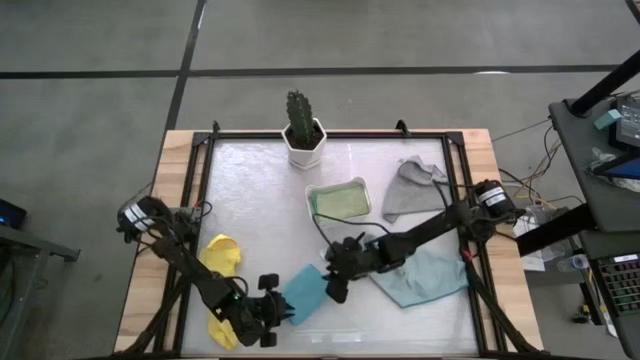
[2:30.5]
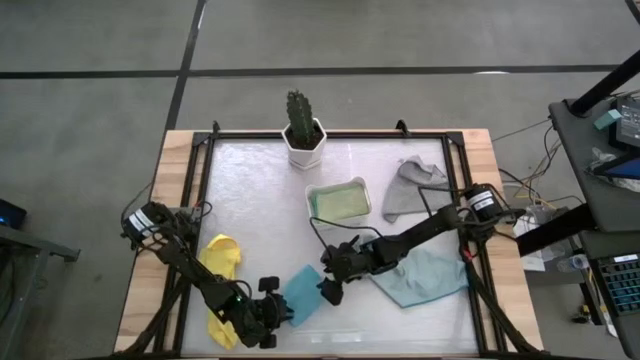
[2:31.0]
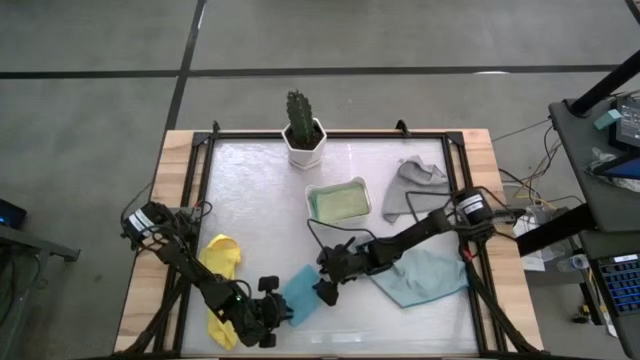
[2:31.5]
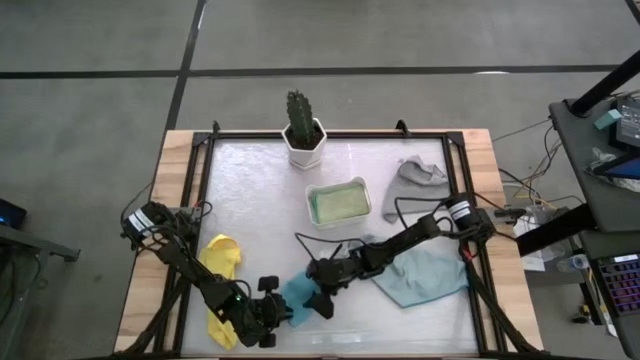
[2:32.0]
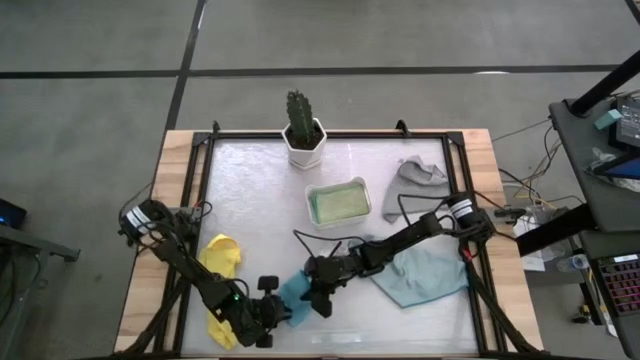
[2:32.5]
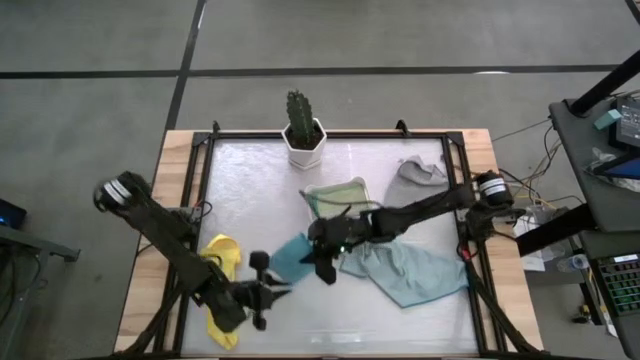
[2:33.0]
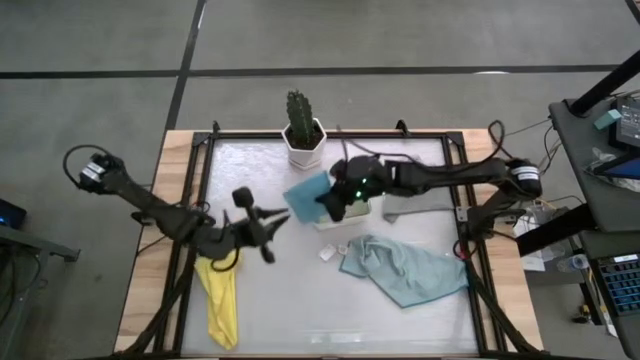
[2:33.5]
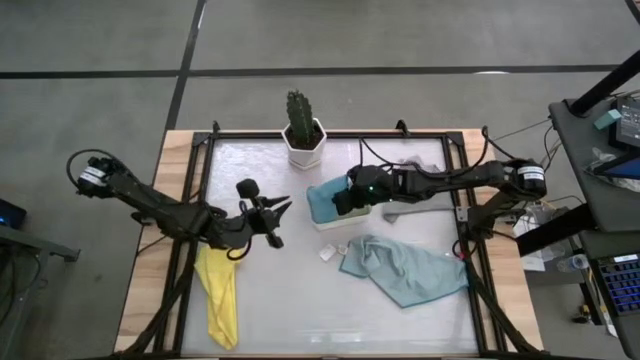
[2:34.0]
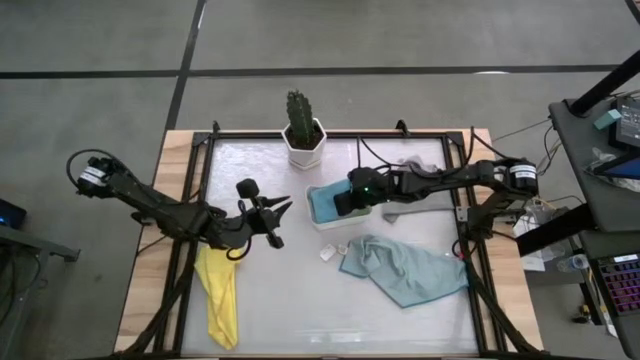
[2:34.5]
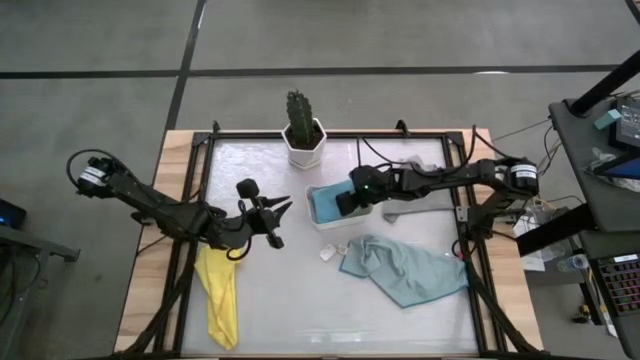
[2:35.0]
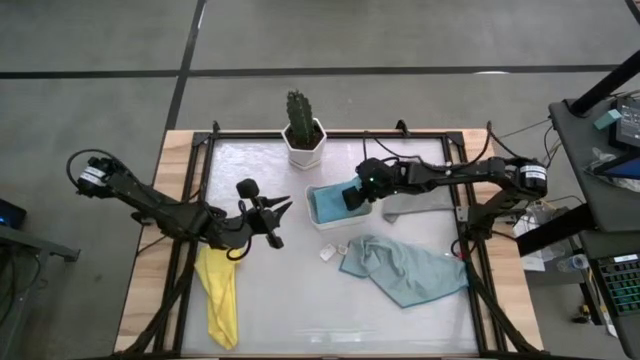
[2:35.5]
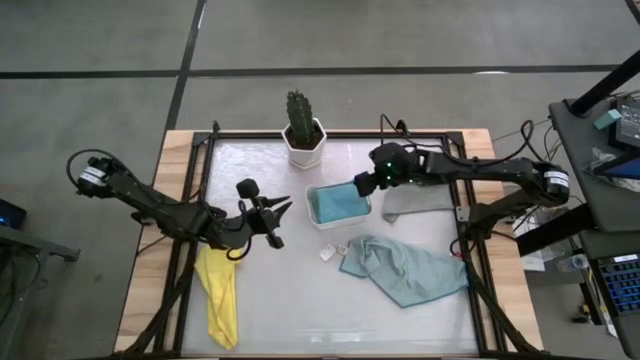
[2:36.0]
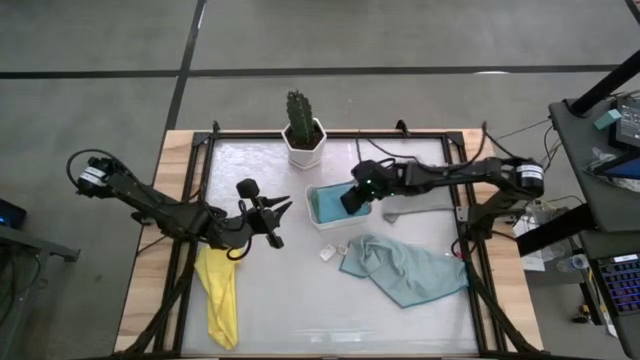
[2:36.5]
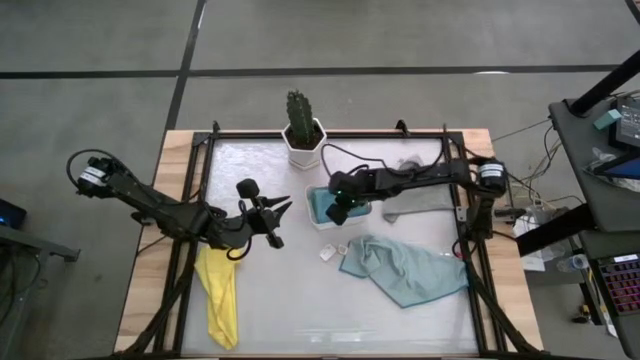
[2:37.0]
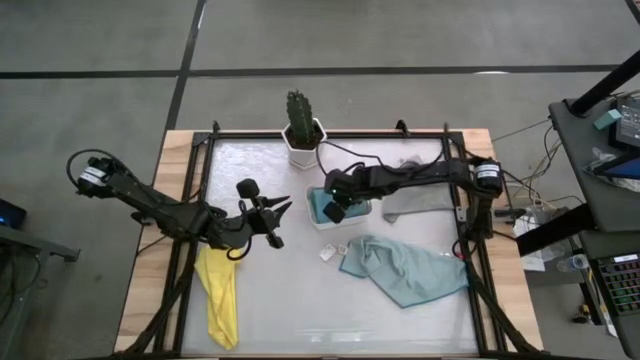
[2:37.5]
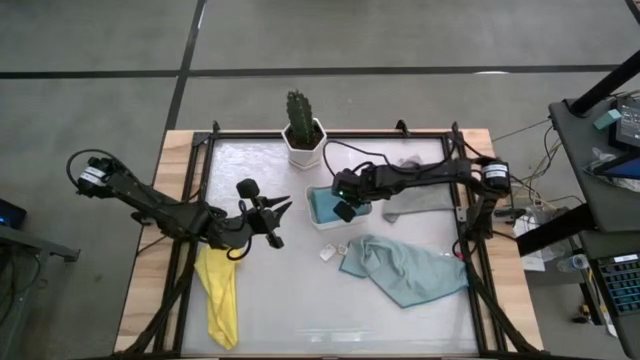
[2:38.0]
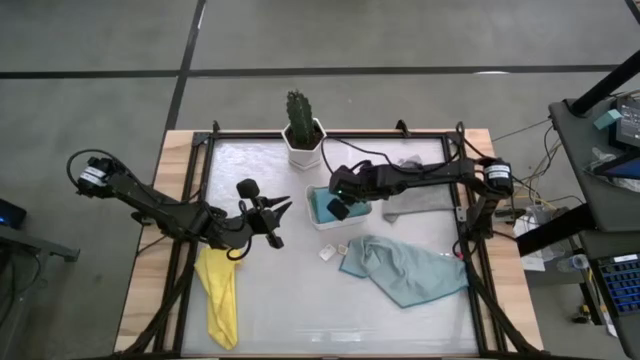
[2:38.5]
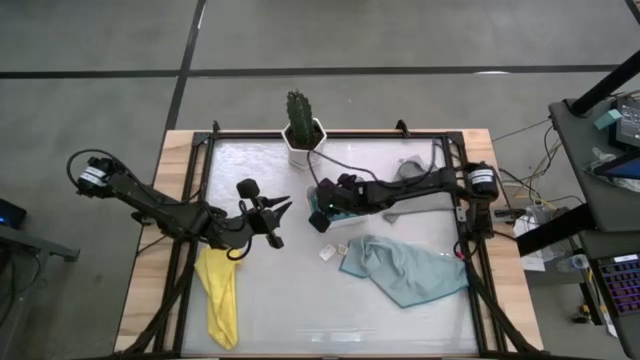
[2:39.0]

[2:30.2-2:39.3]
Task: Fold microfiber towels
Put the blue towel into the bin

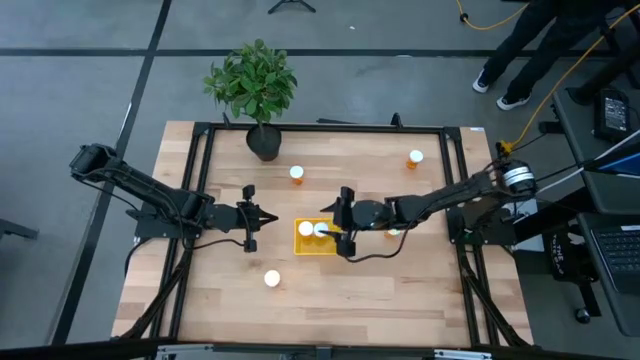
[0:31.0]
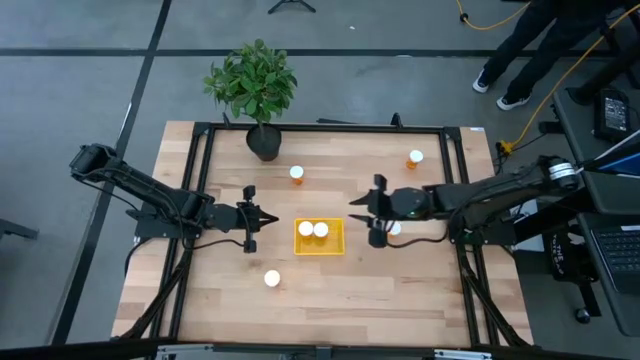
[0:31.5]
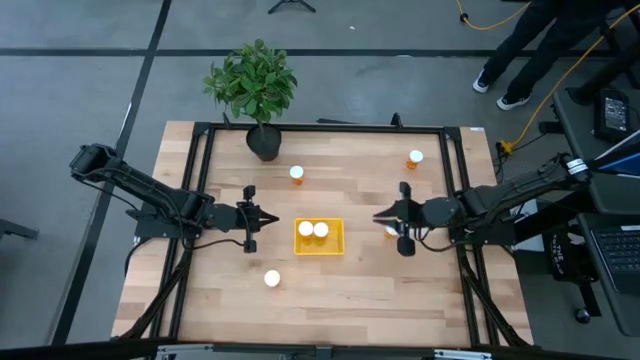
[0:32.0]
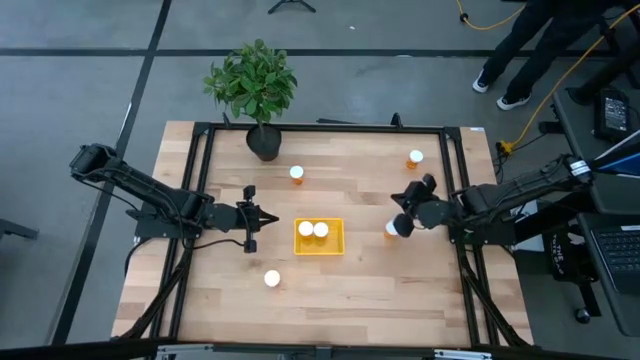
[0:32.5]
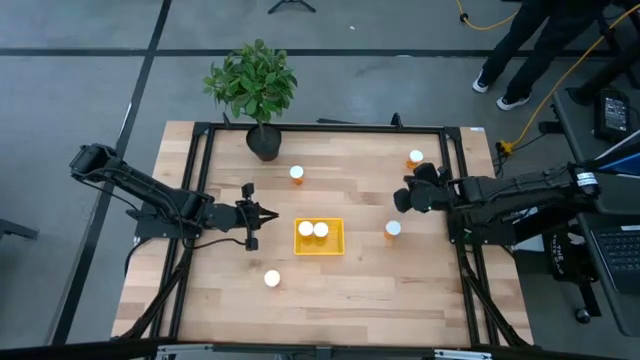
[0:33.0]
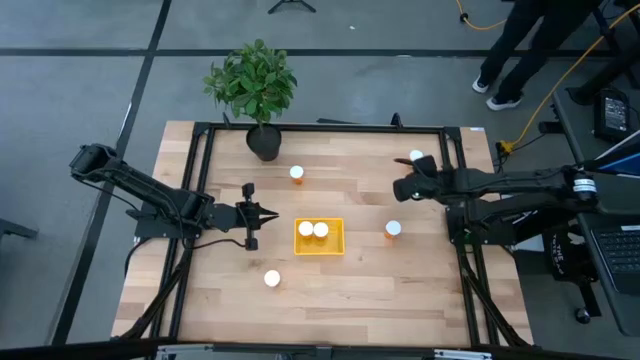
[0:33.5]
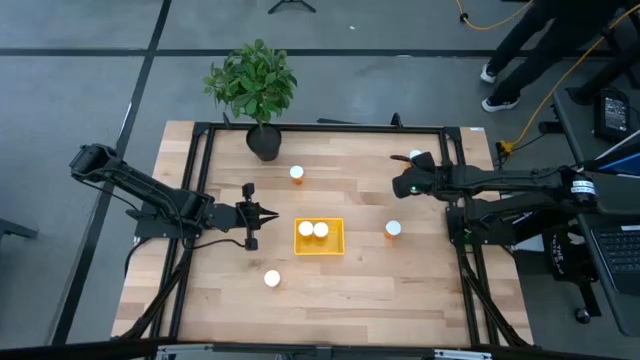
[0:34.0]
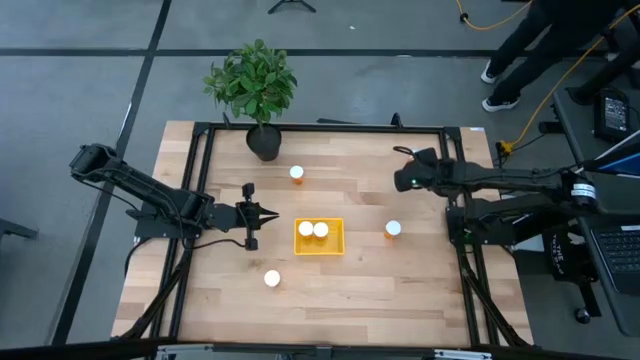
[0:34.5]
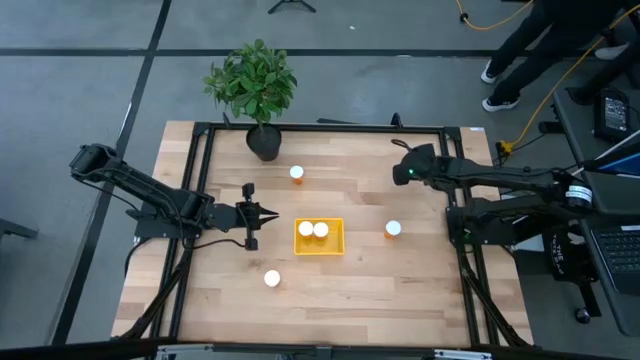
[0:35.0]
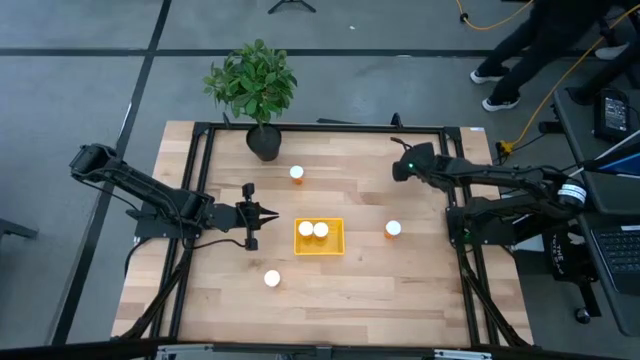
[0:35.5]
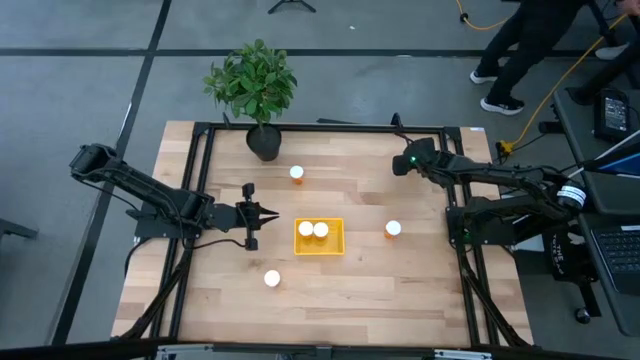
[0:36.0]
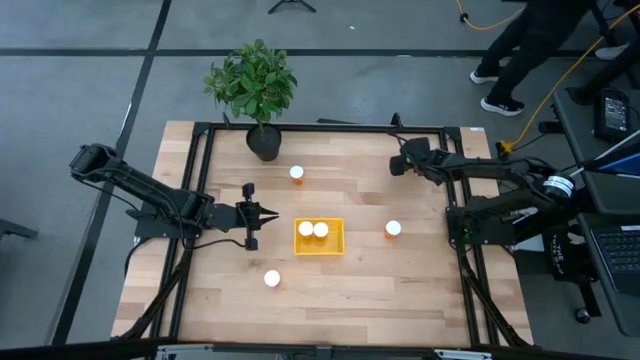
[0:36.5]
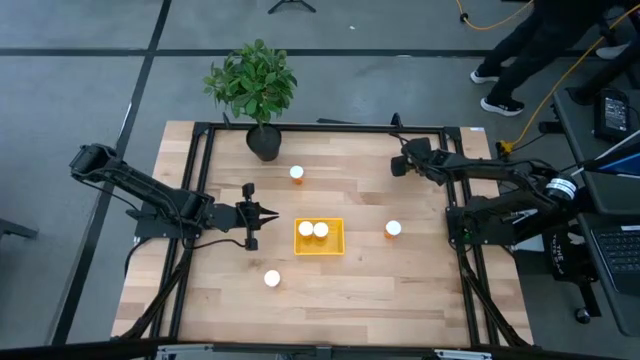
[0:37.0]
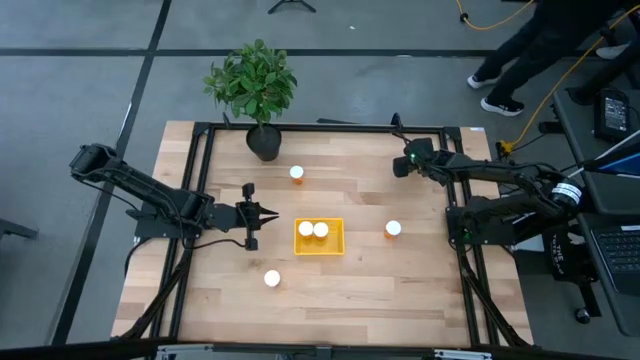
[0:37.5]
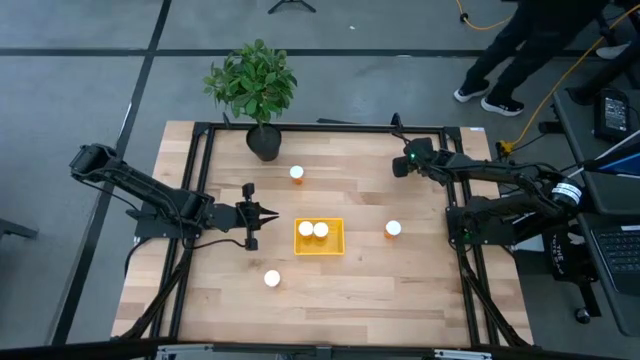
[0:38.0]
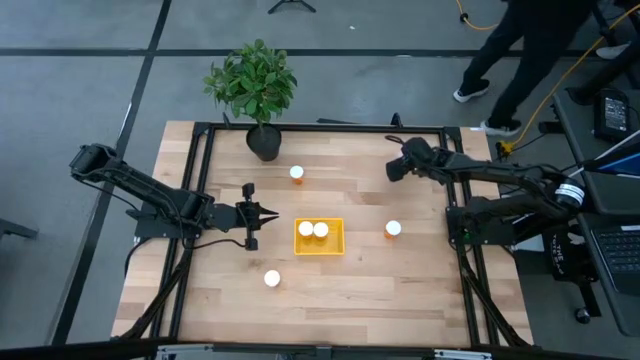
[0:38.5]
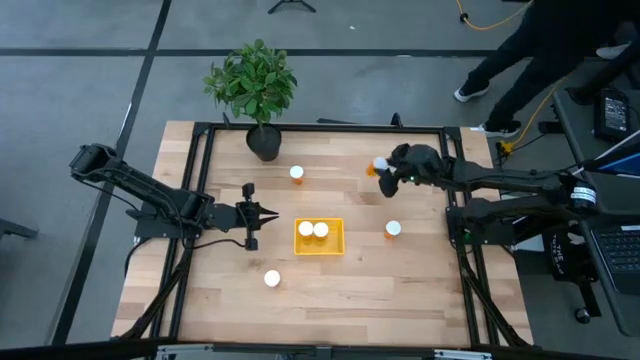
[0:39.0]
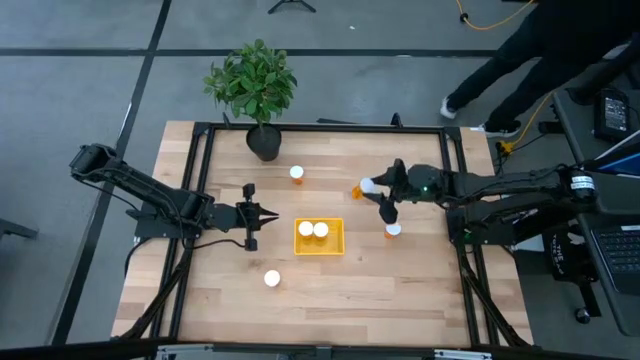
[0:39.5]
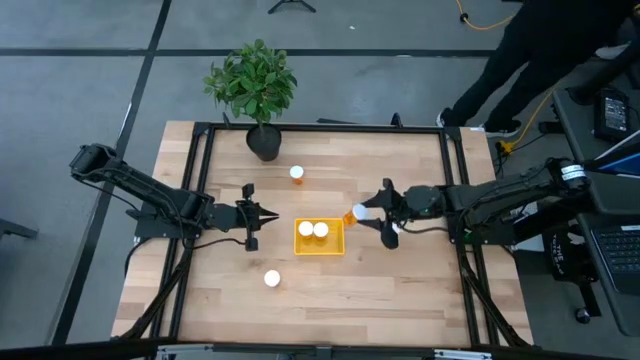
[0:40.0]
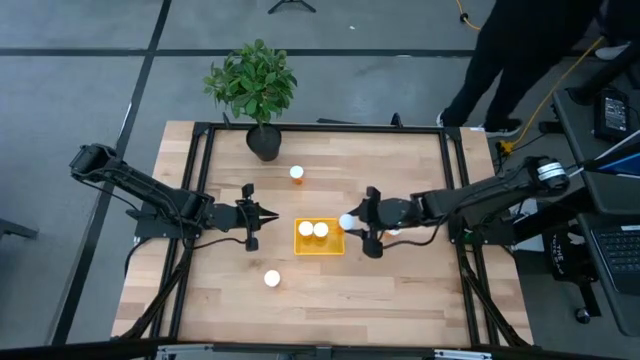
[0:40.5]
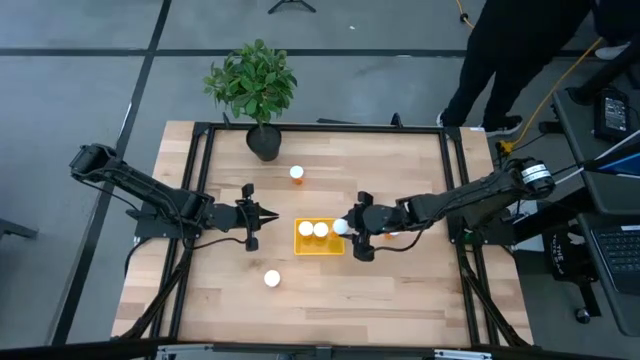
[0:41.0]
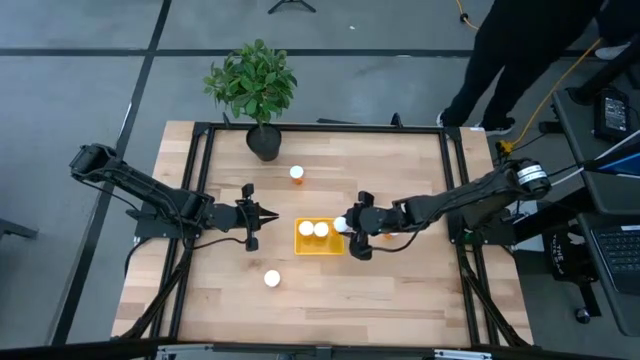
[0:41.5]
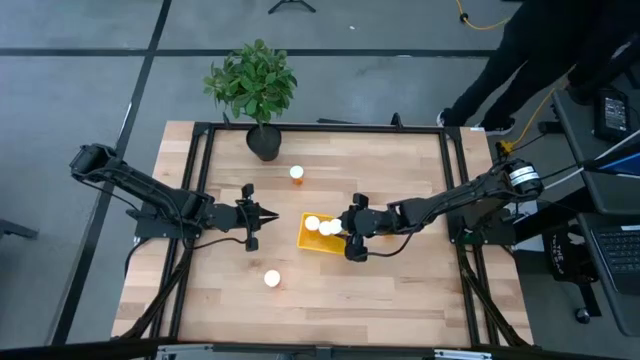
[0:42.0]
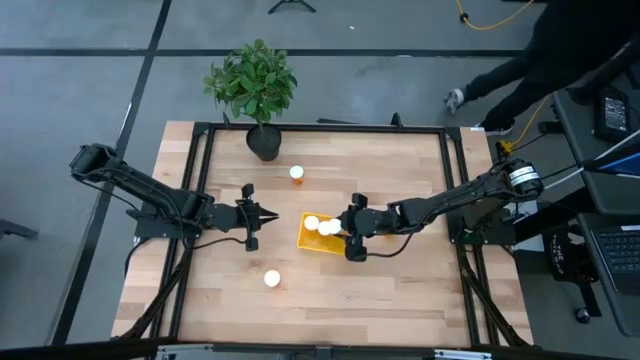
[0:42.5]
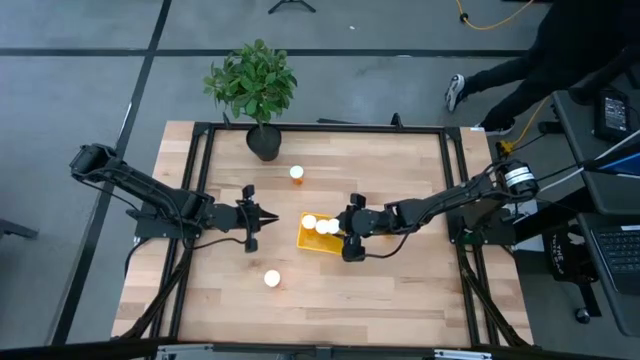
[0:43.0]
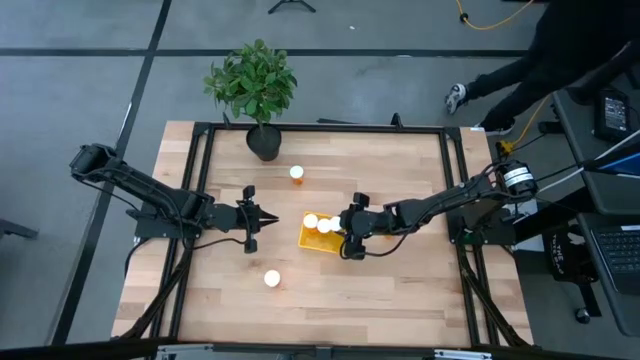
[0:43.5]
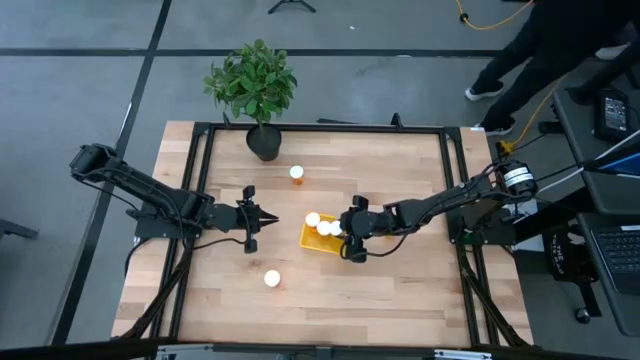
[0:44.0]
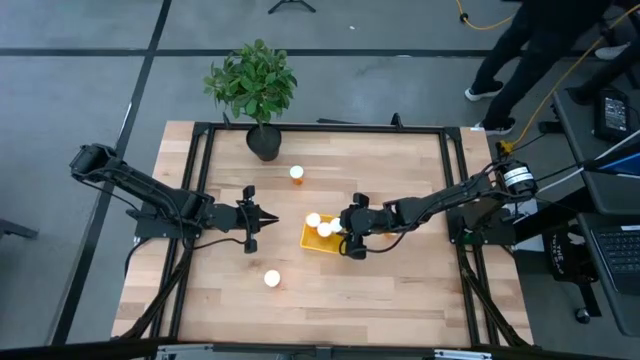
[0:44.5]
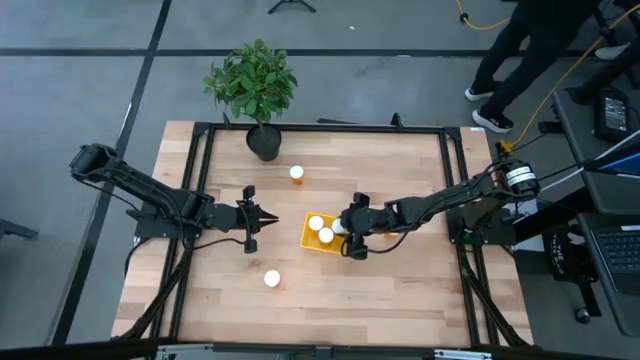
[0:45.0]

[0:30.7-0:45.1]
Task: Pick and place pill bottles into a basket
Put the orange pill bottle into the yellow bin
